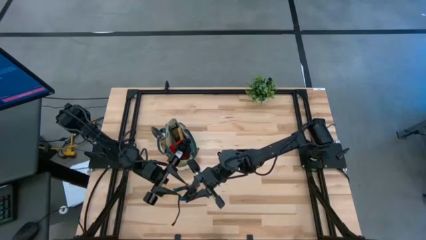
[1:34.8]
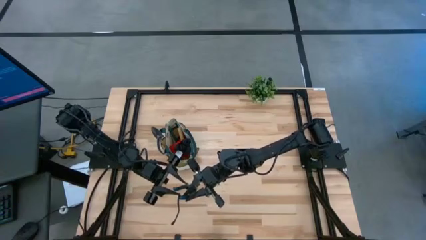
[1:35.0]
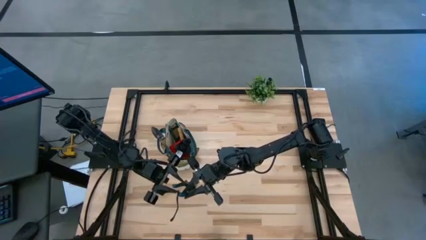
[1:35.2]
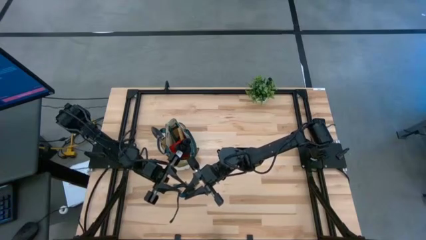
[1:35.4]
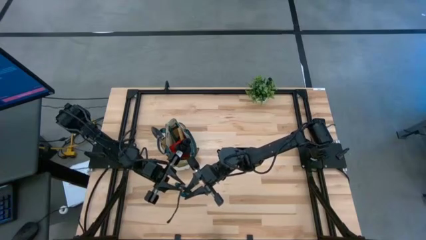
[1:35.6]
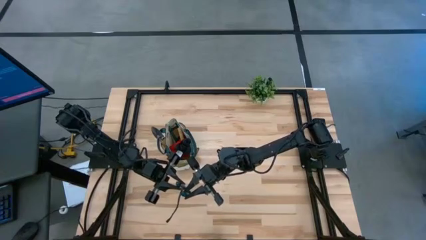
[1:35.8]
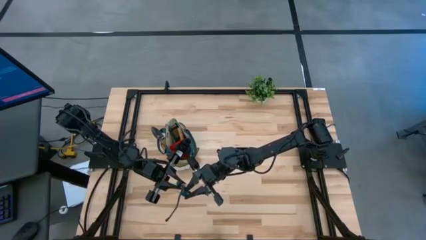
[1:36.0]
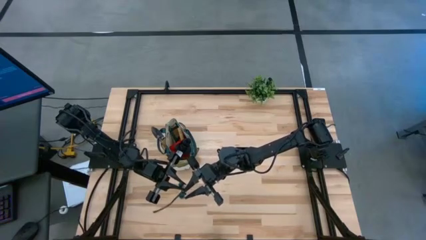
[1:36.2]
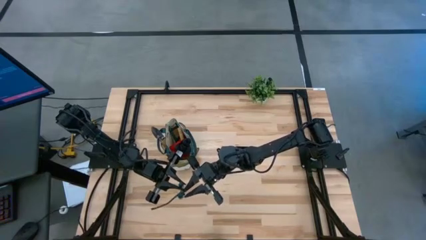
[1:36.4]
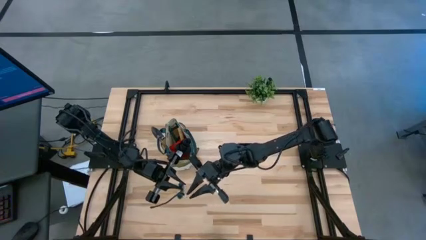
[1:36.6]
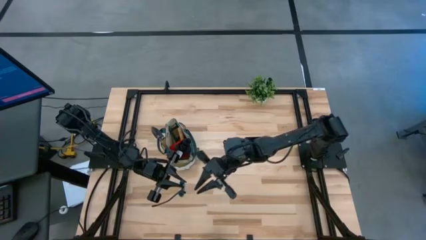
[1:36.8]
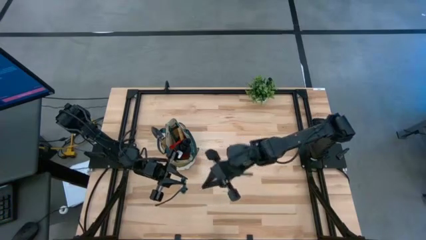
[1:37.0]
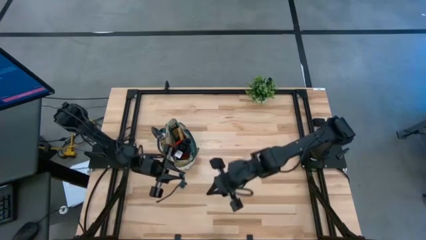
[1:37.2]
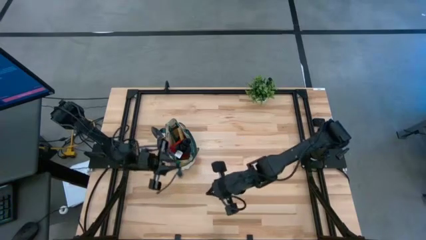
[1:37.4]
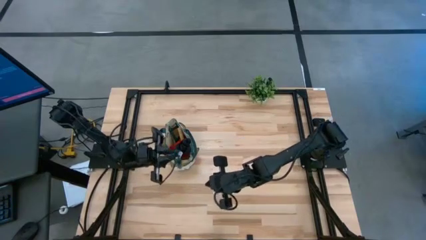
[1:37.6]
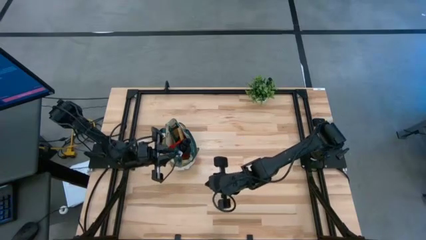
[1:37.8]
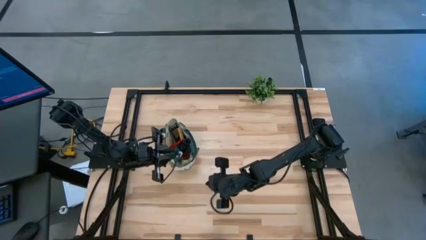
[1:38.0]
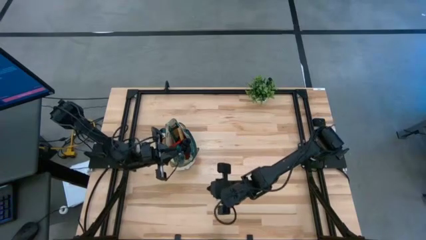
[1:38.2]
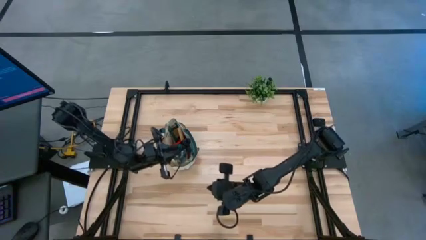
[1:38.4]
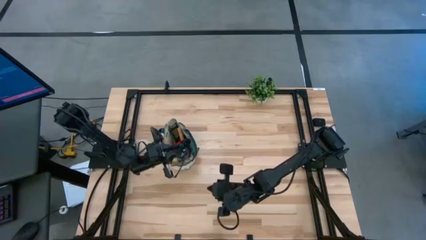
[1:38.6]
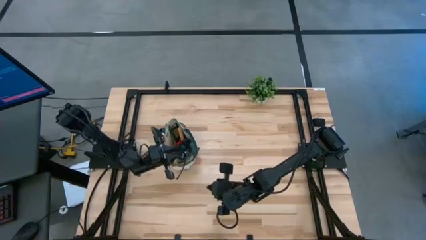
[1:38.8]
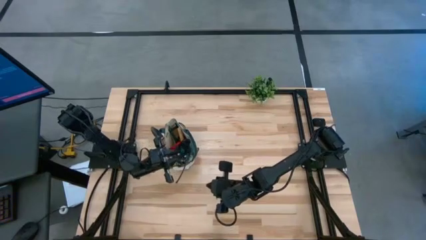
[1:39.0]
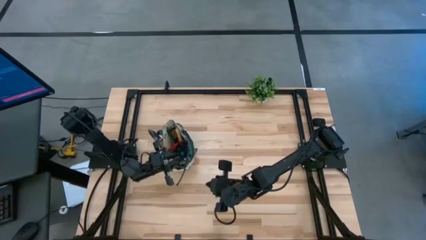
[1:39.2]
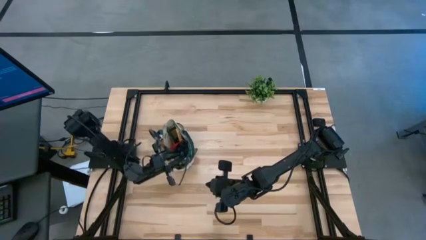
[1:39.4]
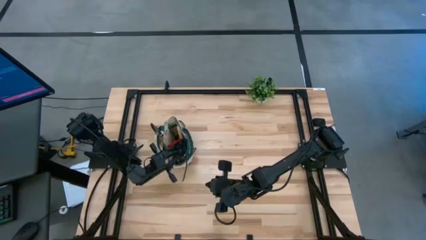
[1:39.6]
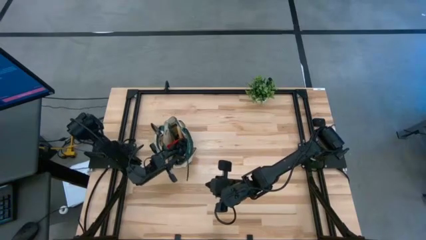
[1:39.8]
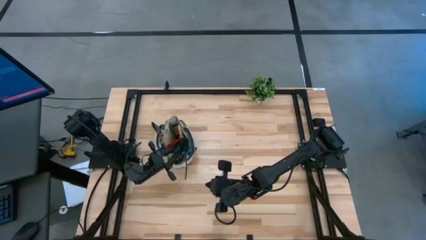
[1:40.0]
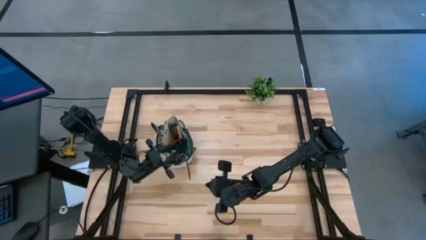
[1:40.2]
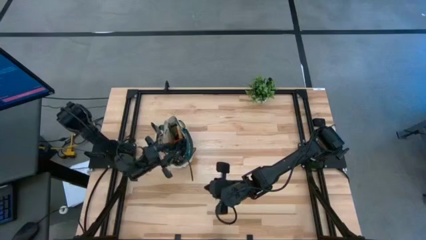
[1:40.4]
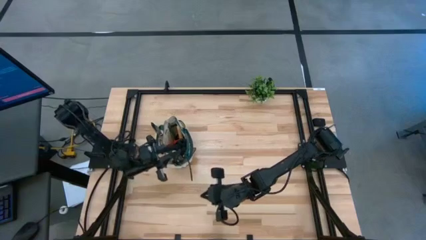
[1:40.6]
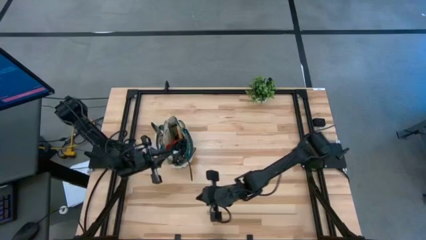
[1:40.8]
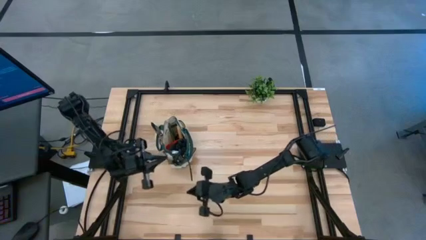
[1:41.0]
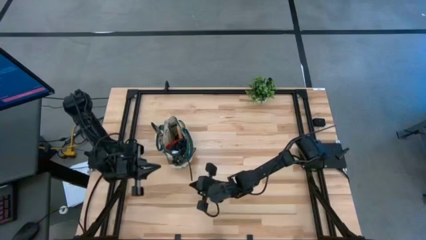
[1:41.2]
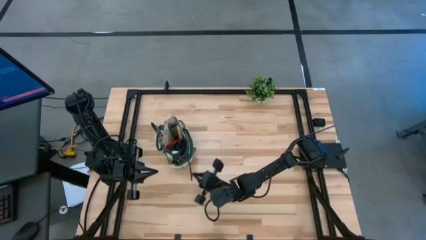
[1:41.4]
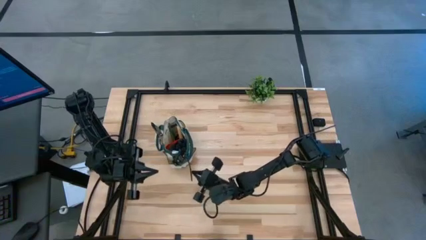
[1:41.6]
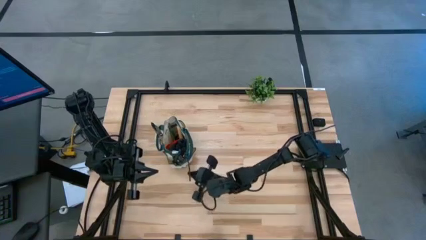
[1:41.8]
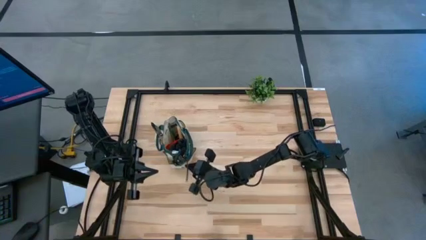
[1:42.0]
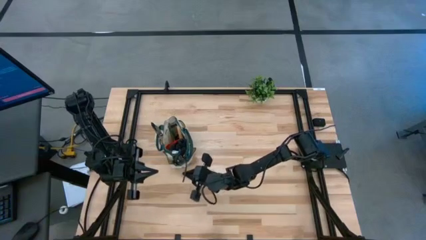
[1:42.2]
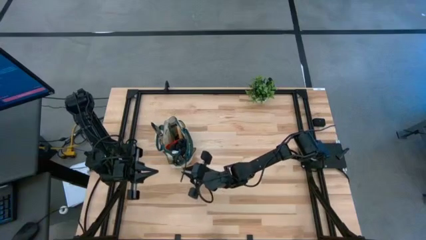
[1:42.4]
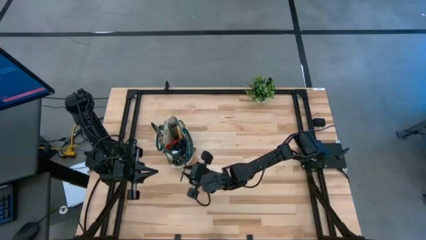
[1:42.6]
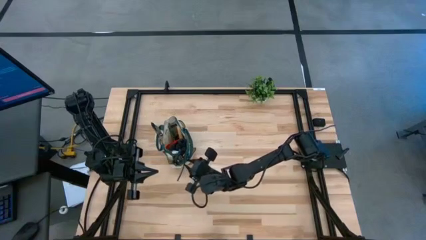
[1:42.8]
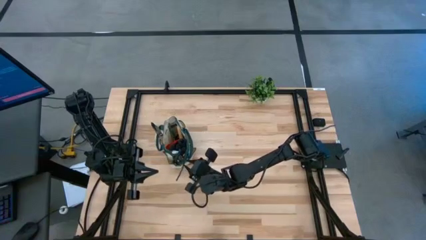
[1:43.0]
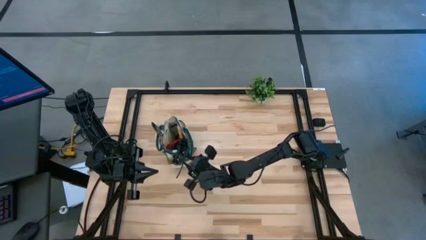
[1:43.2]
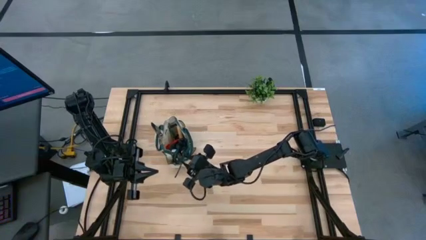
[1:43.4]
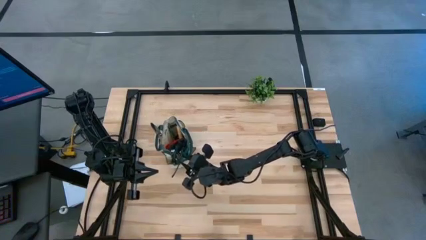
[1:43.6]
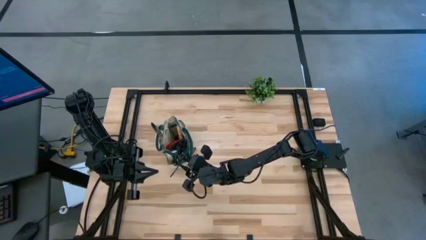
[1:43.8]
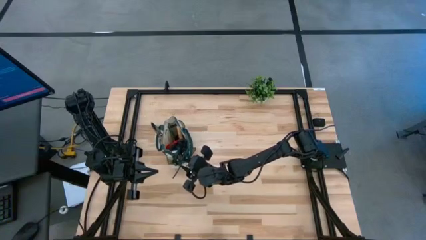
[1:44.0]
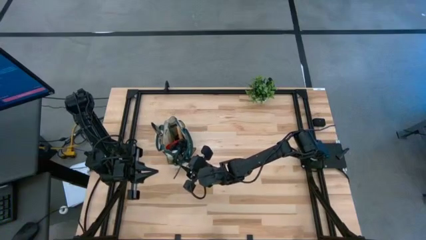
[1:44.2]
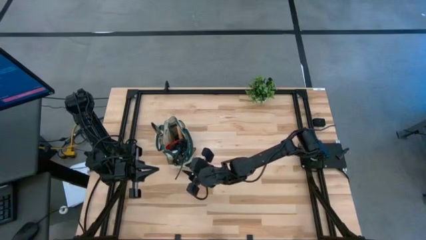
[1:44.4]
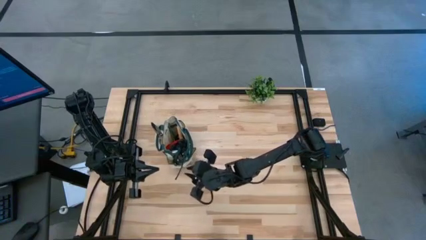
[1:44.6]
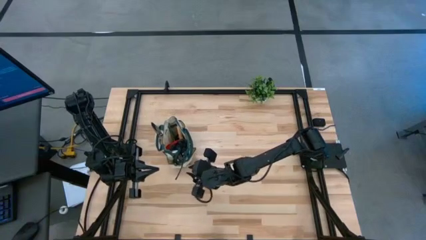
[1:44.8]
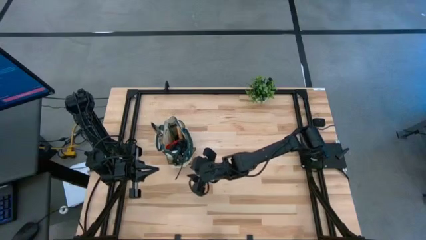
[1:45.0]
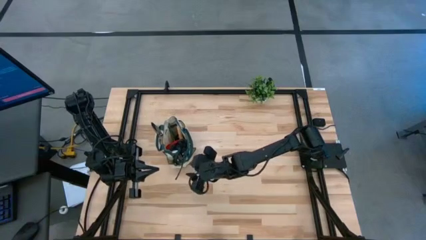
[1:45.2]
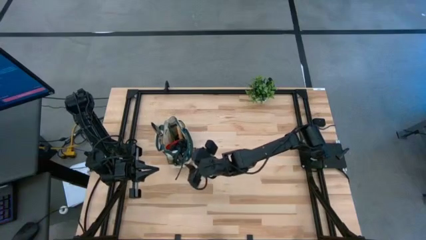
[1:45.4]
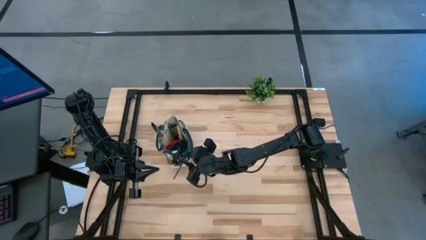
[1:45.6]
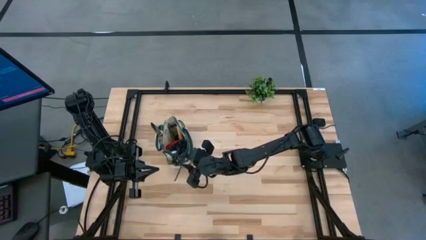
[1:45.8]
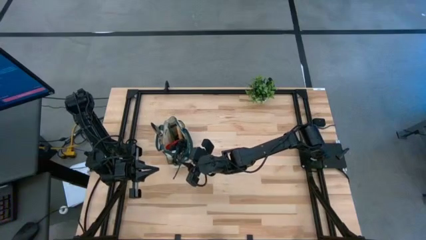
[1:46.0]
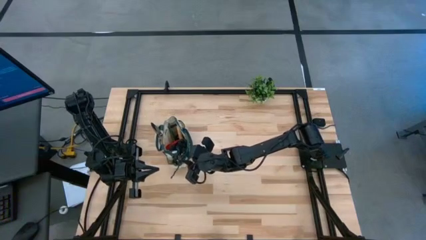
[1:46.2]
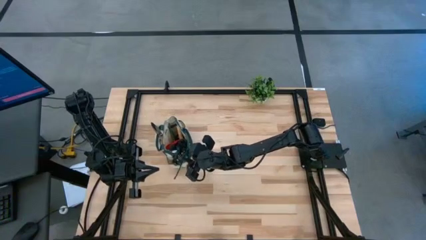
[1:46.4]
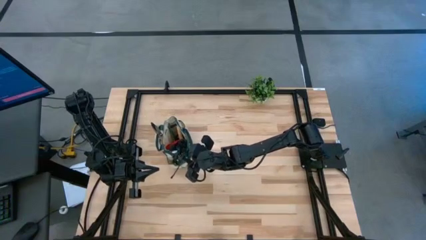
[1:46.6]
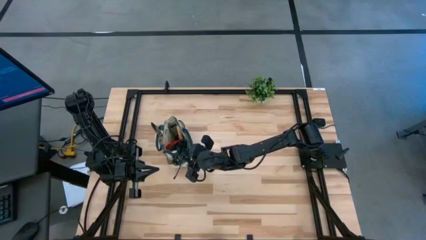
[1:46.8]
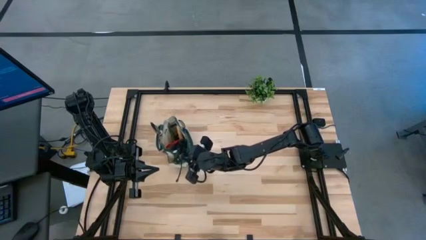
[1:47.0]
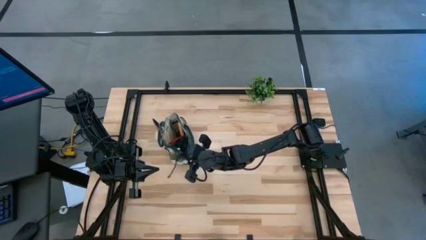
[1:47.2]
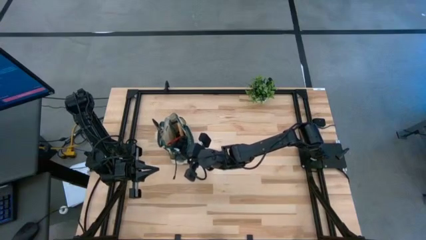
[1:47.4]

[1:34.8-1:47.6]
Task: Pick & Place Garden tools in Gardening bag
Put the green shear scissors into the green gardening bag

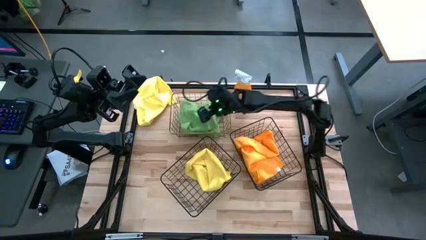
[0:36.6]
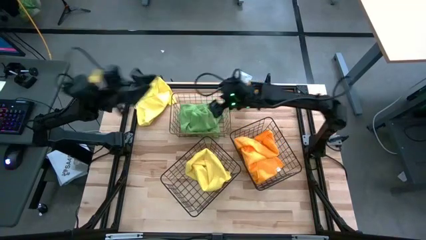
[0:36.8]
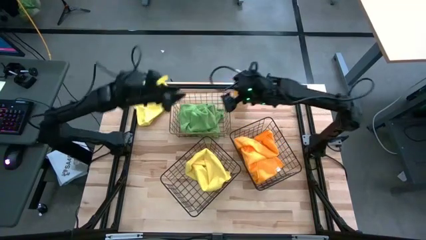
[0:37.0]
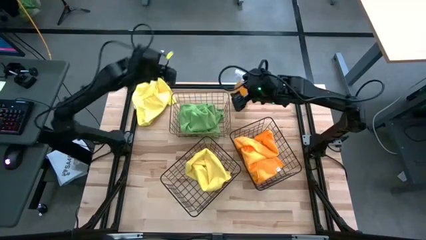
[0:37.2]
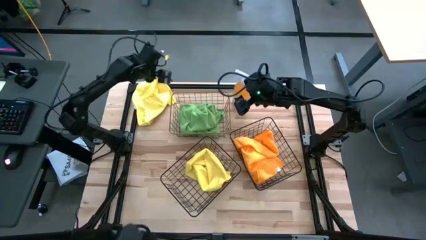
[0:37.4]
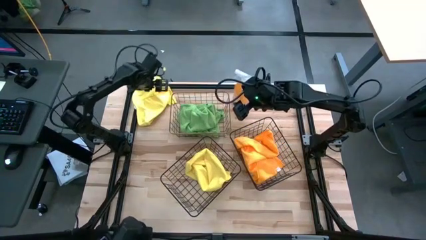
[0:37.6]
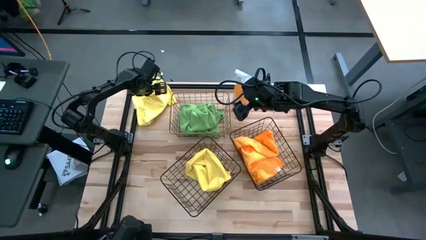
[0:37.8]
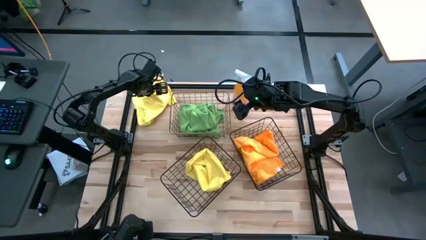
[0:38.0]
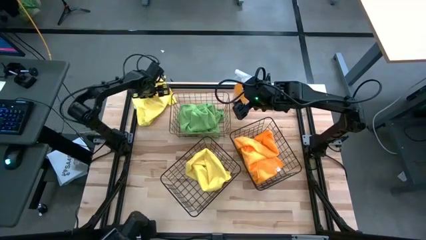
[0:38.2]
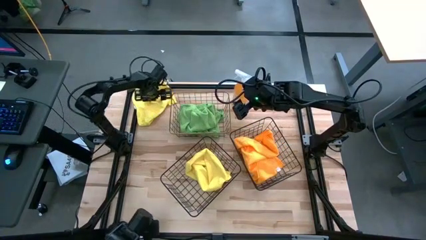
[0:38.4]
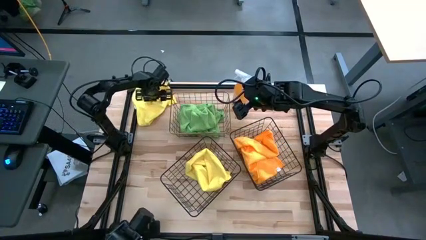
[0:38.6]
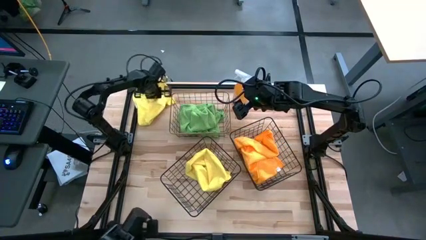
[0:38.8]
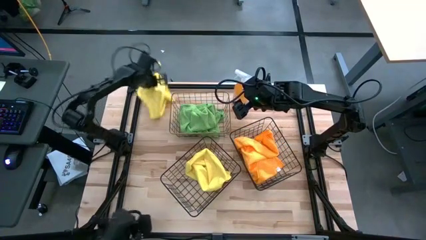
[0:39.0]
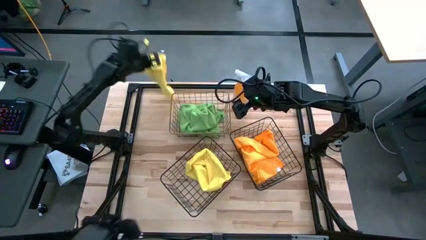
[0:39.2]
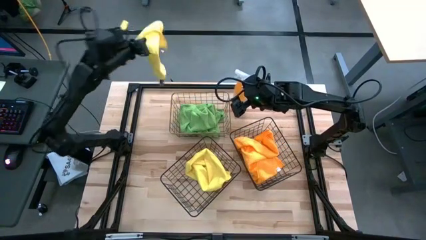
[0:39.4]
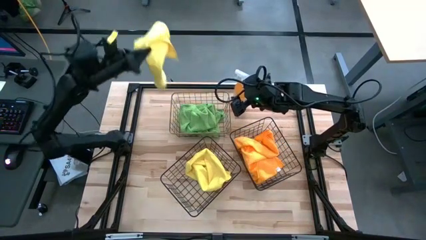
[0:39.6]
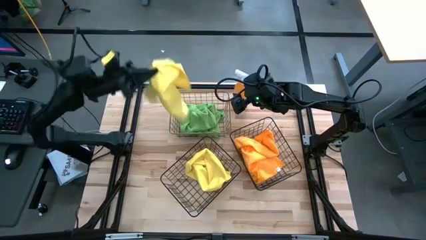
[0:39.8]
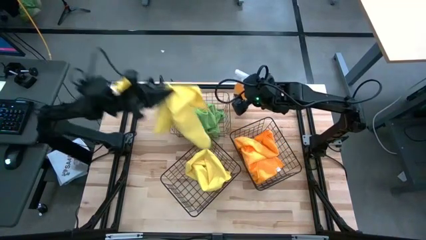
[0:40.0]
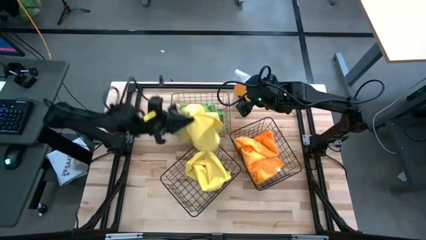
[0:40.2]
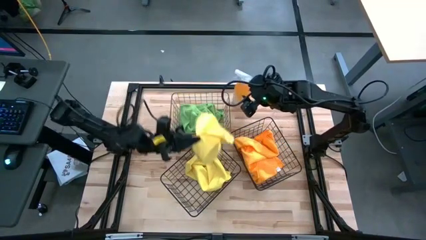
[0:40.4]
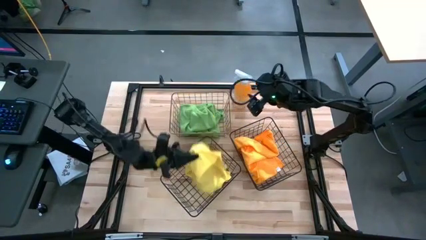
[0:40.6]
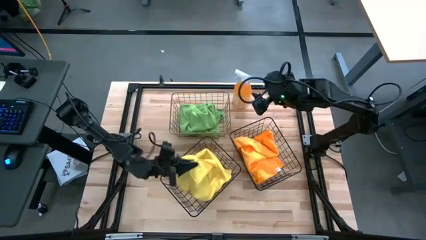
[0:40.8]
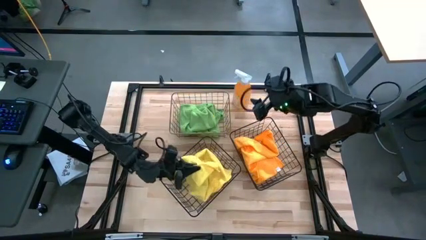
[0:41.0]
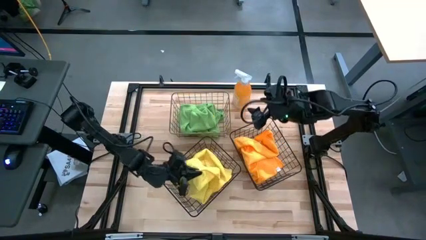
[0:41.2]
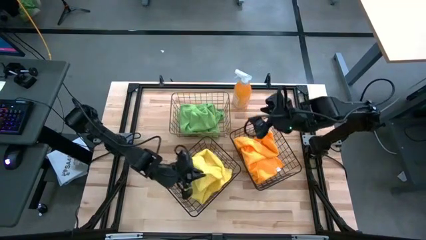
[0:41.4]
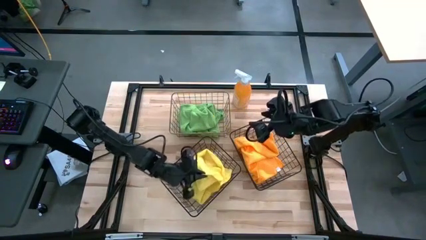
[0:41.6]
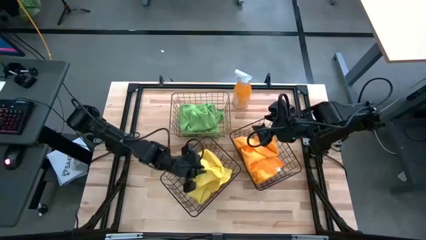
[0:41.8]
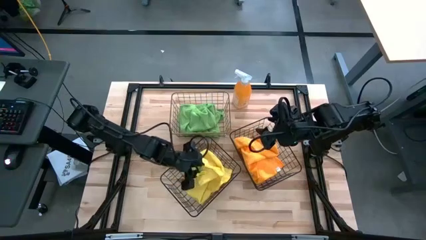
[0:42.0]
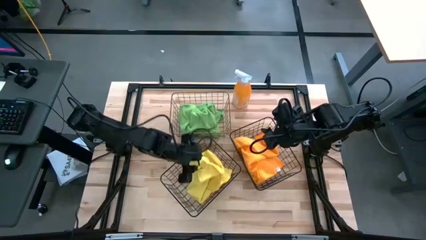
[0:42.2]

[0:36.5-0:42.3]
Task: Sort microfiber towel by color & place in baskets
Put the yellow microfiber cloth into the left wire basket
